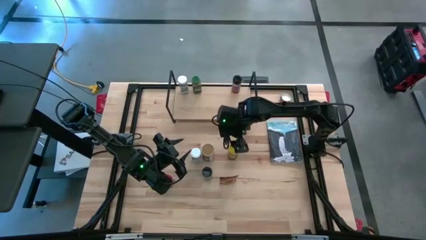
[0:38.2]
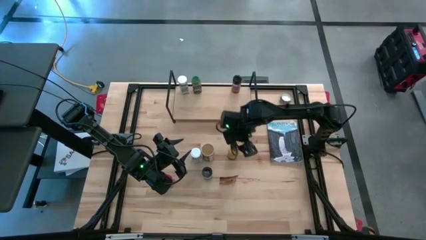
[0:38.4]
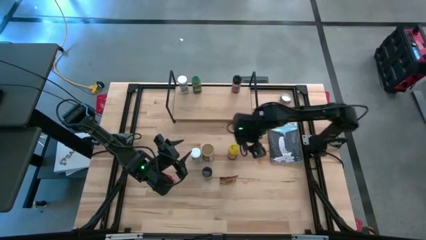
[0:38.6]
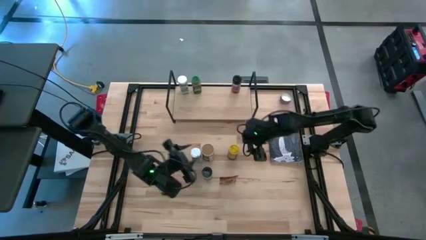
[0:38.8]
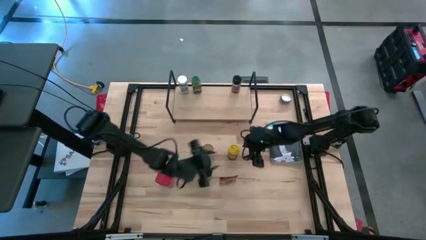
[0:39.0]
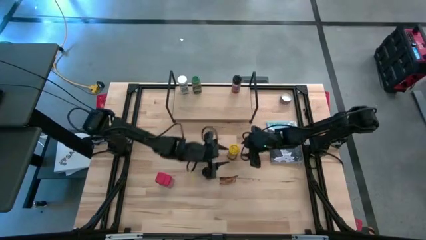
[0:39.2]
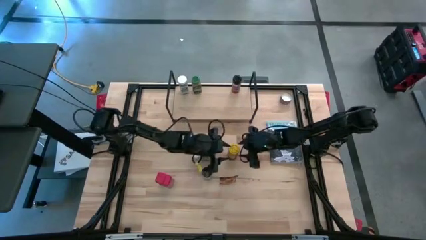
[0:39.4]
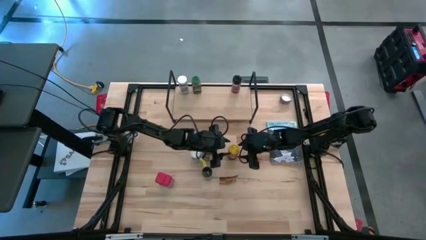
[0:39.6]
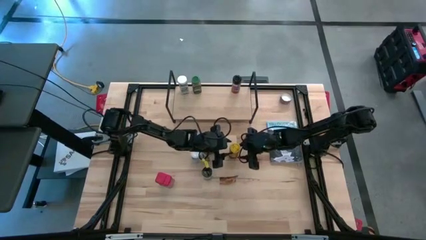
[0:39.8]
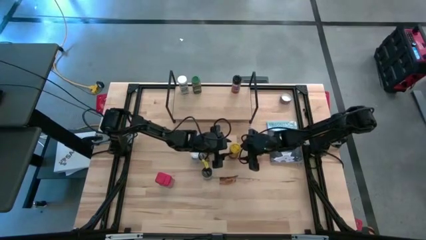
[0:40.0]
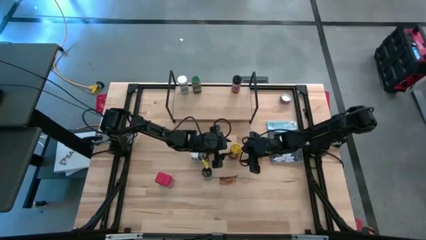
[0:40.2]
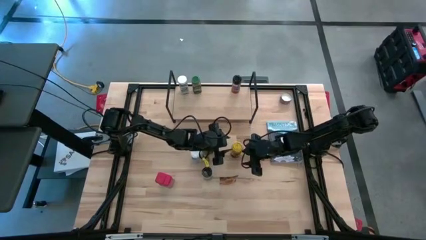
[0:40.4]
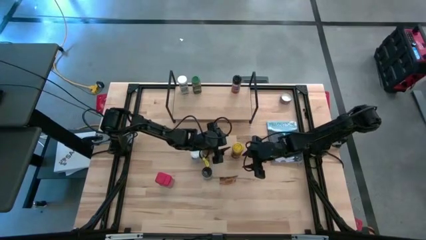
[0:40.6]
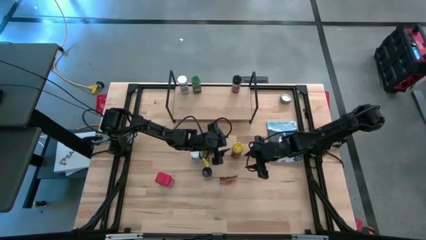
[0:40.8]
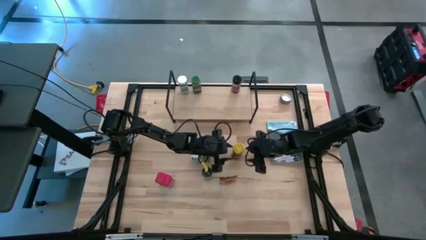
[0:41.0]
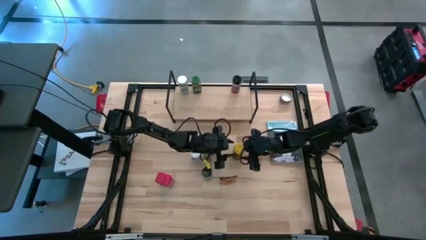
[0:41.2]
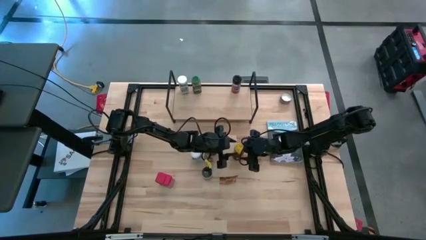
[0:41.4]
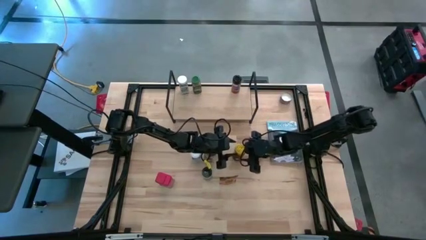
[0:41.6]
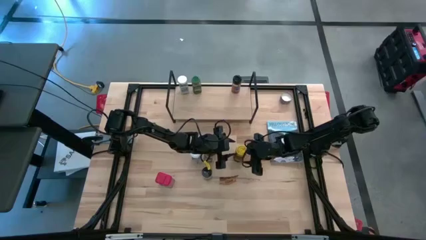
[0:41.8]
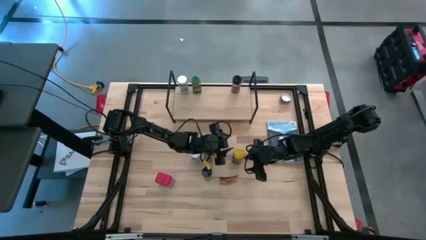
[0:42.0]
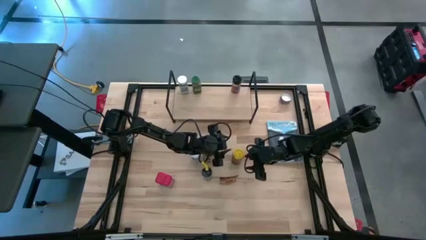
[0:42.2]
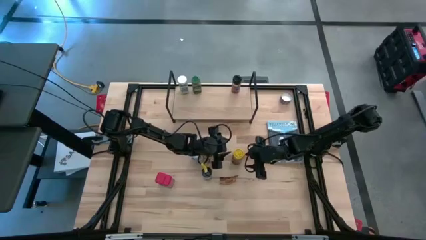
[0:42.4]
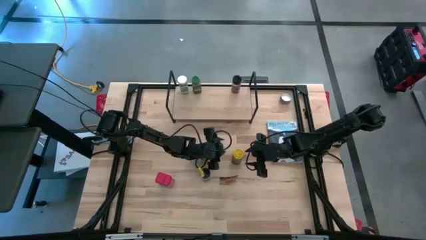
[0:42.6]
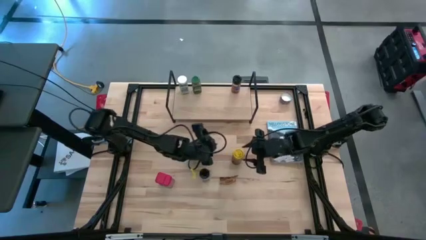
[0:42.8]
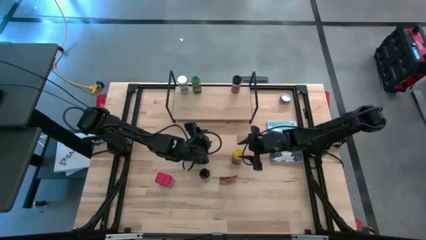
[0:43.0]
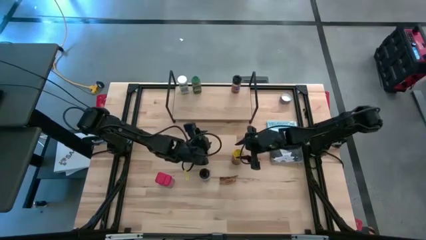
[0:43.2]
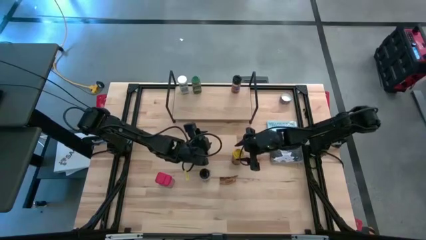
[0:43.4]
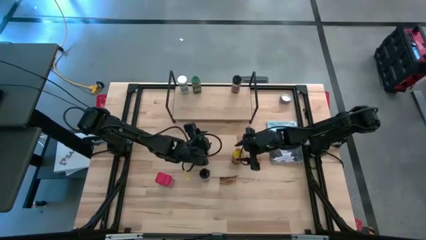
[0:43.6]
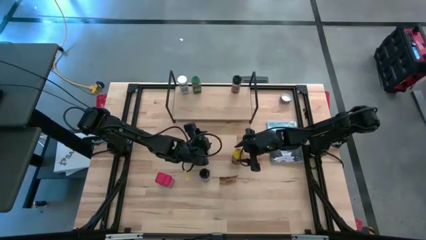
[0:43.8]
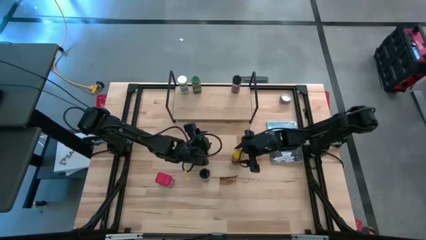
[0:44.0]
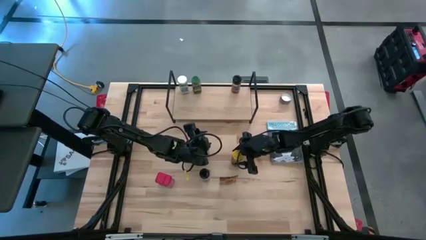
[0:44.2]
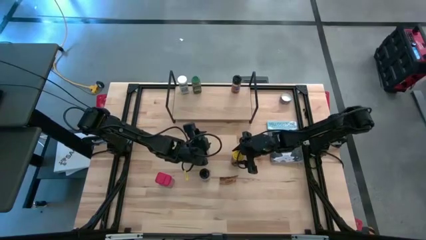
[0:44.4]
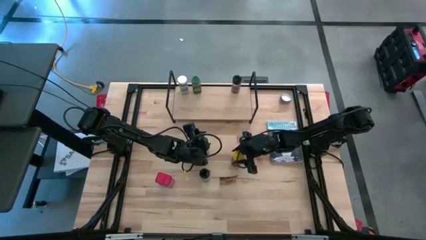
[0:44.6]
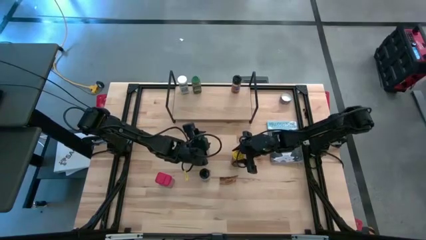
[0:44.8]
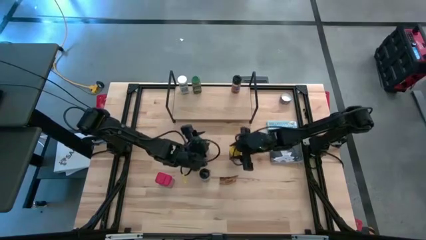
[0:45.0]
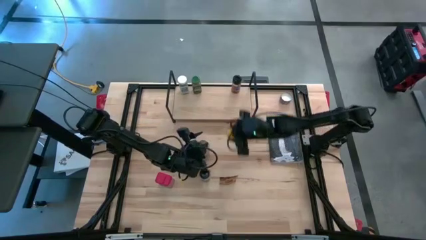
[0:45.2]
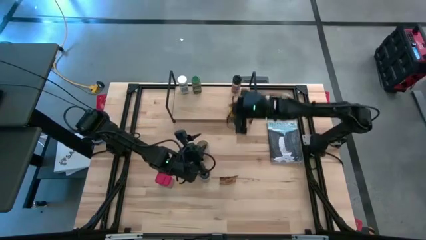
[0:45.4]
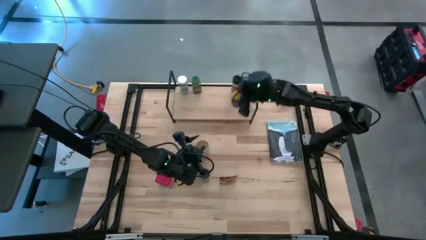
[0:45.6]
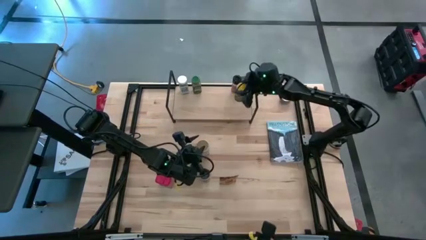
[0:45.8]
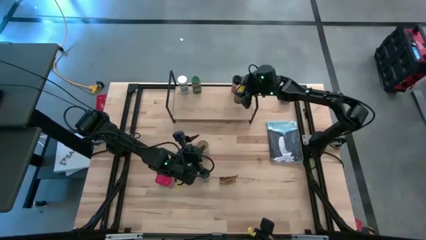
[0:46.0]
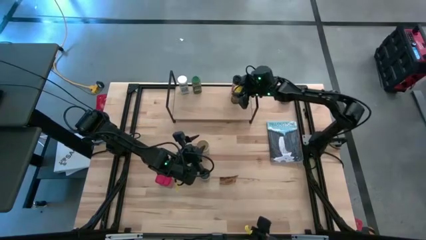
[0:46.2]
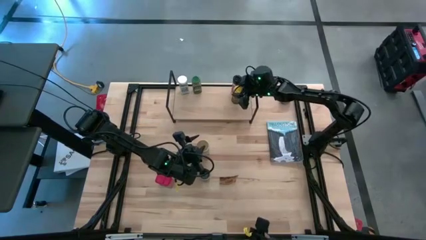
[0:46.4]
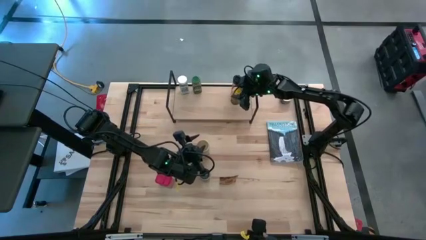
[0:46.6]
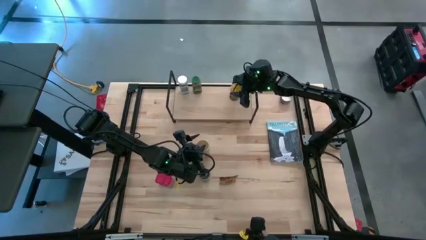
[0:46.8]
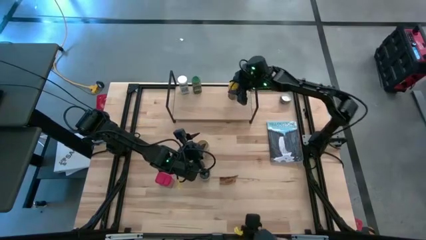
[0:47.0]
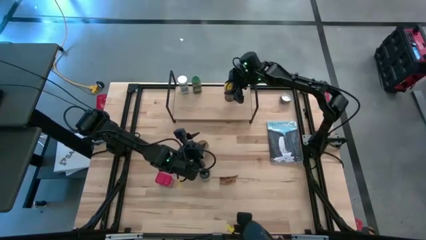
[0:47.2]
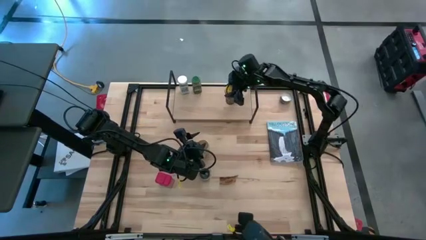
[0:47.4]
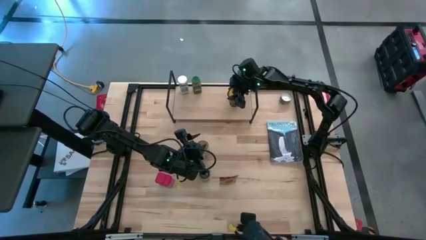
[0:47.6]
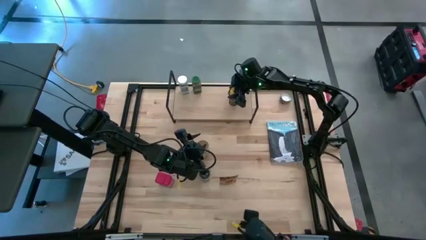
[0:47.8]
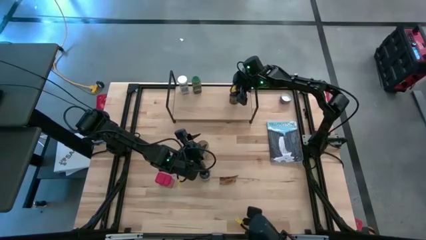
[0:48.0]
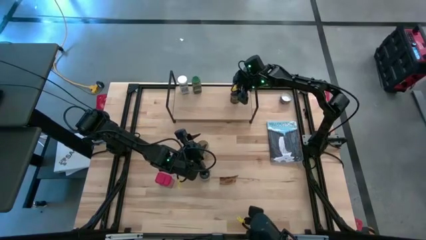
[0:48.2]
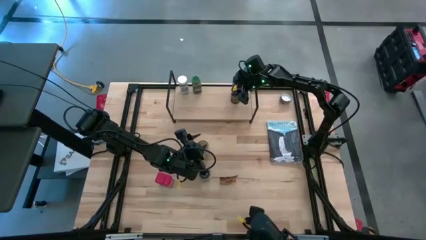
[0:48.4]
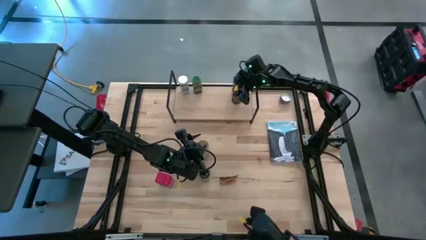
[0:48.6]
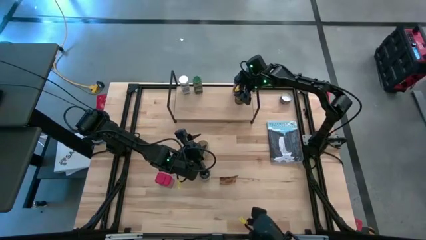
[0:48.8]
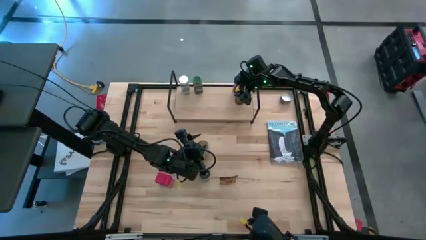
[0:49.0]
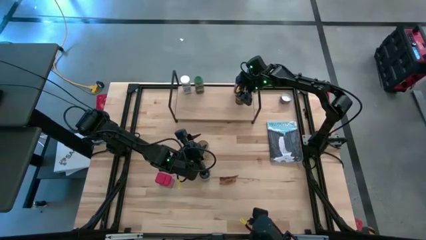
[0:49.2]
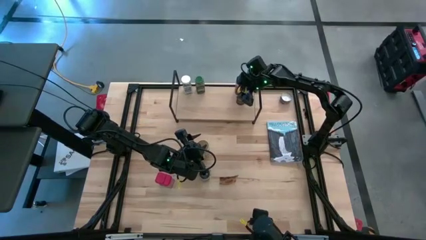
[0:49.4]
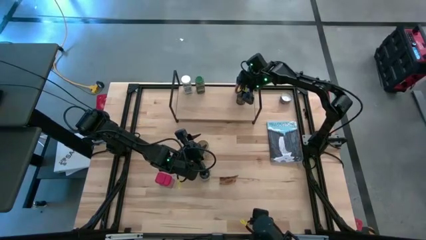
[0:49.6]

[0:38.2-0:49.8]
Task: Shelf spices
Put the yellow seasoning bottle on the shelf

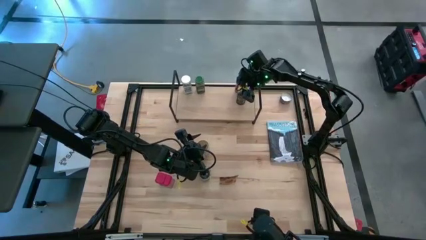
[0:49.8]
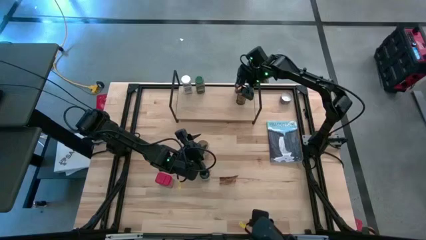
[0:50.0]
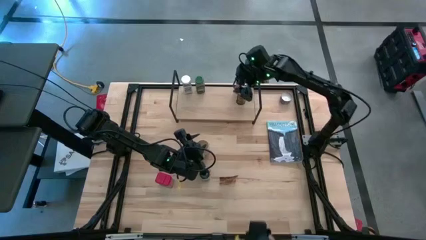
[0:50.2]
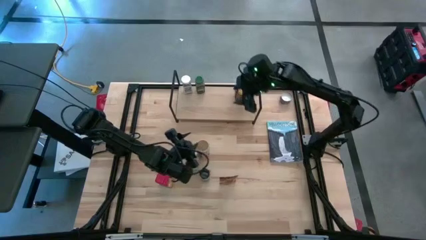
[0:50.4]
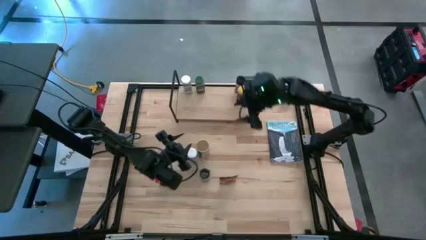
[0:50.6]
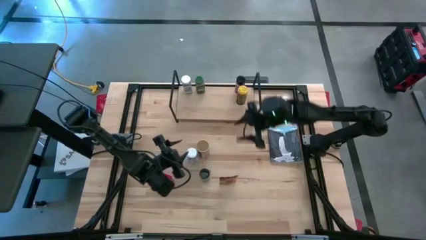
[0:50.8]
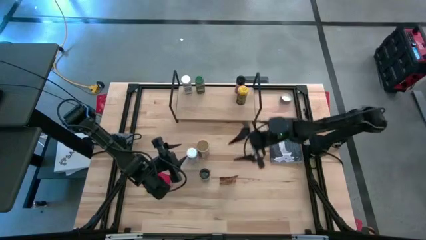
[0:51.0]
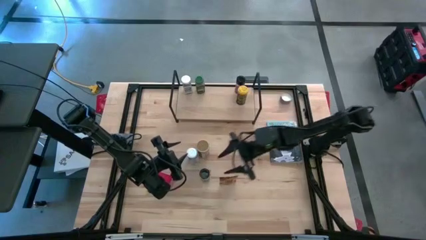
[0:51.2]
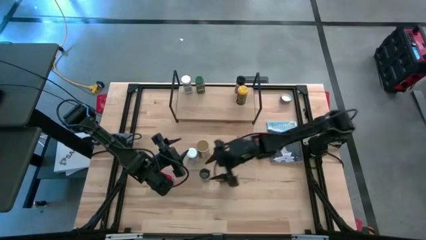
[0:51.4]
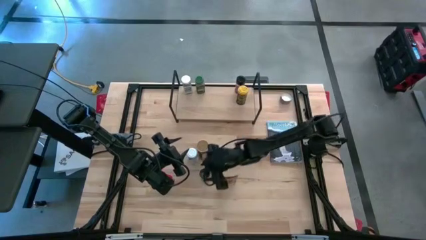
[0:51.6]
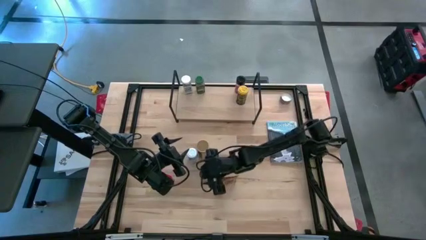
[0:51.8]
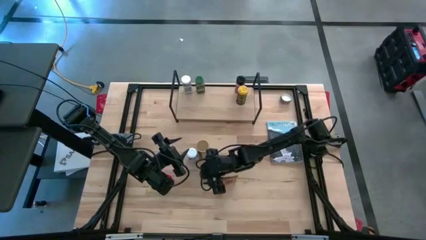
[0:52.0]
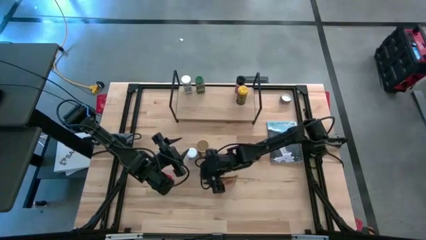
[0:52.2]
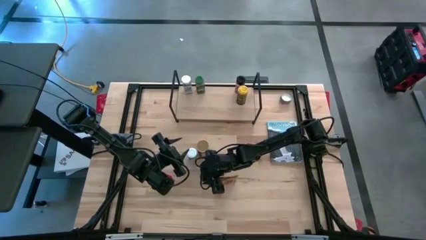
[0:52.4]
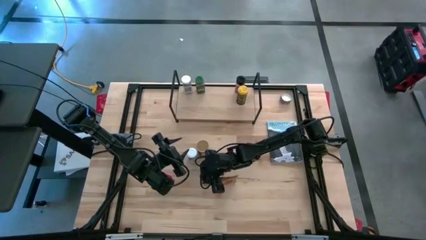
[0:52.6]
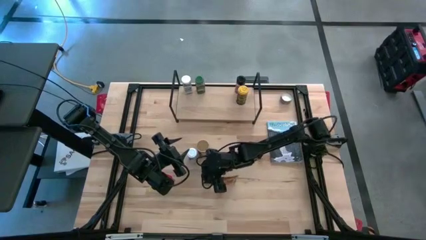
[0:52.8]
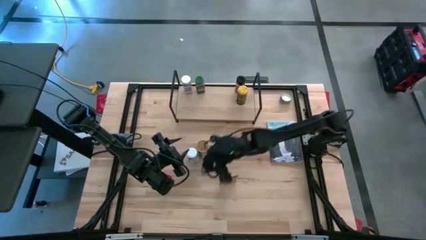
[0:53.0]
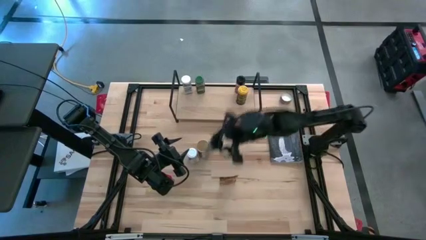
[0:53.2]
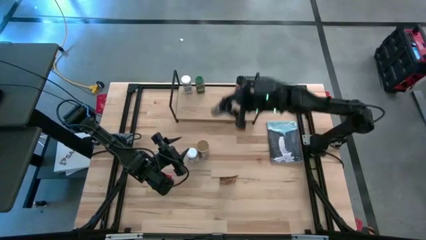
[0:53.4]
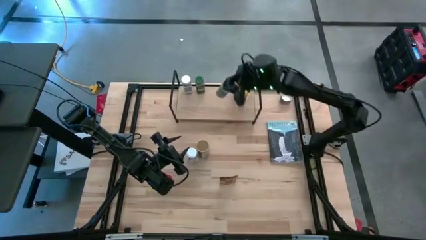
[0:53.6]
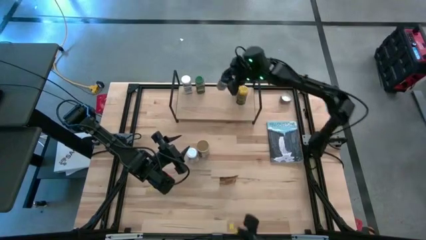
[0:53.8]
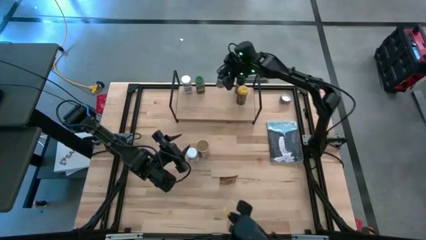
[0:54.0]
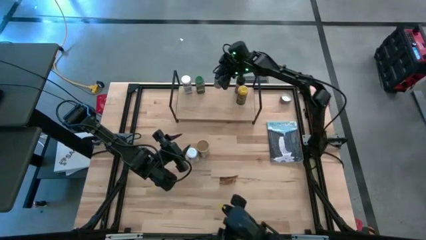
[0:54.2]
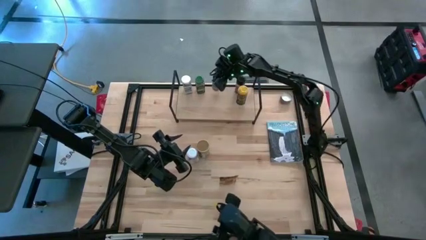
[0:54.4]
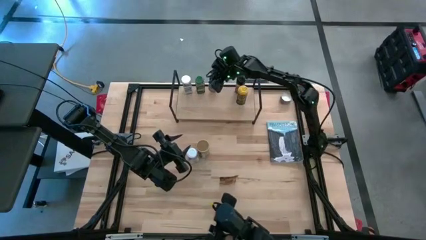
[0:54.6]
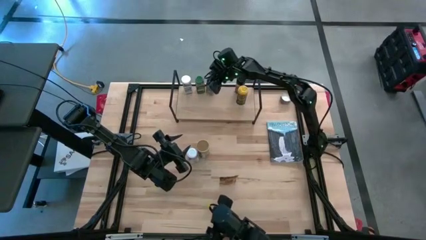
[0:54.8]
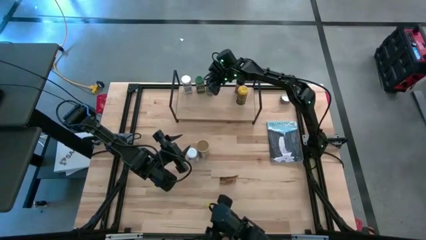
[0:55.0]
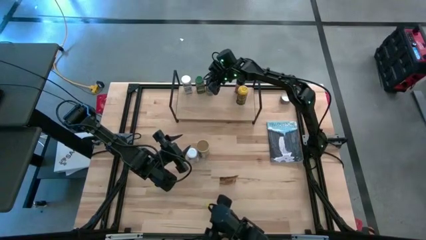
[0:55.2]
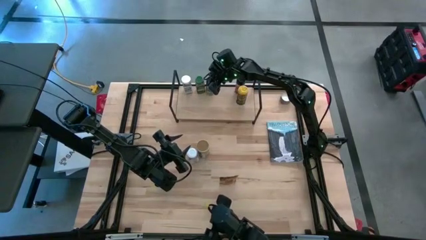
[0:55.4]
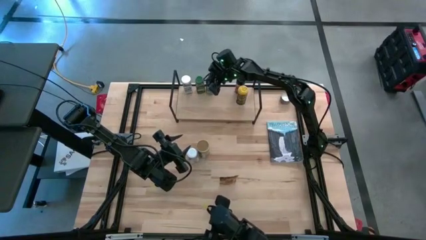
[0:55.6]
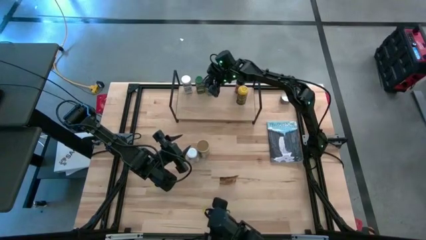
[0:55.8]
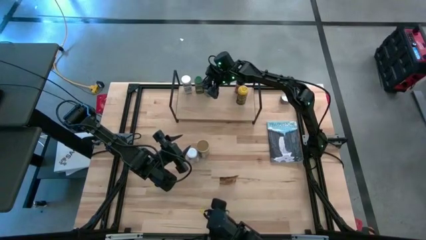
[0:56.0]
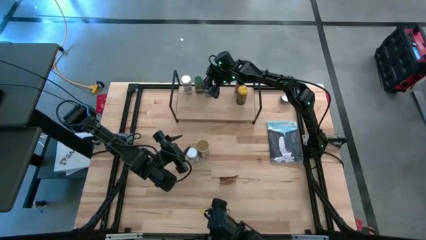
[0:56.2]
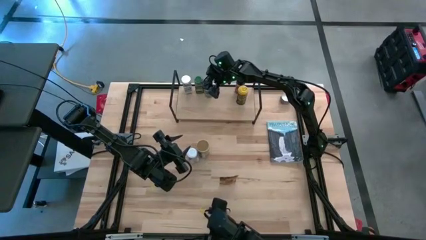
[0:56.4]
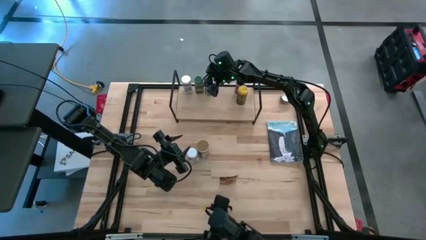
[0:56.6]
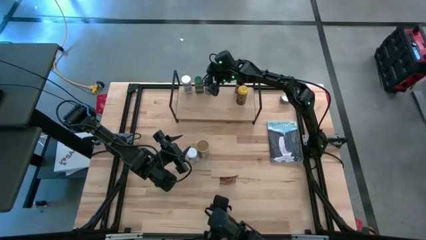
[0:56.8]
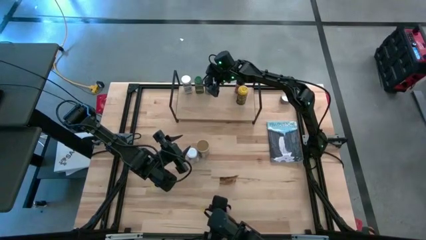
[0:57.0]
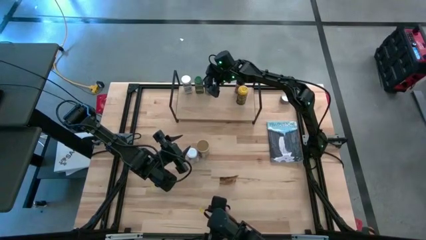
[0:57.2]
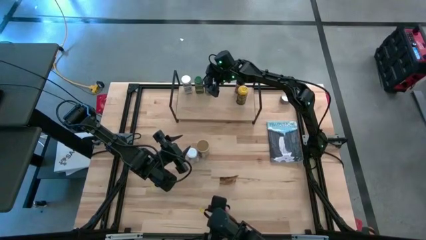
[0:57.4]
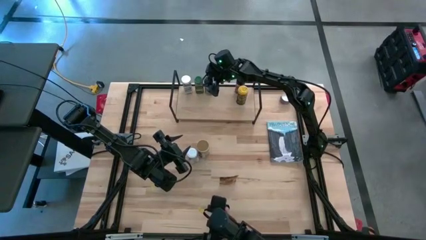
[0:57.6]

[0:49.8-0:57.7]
Put the black seasoning bottle on the shelf
